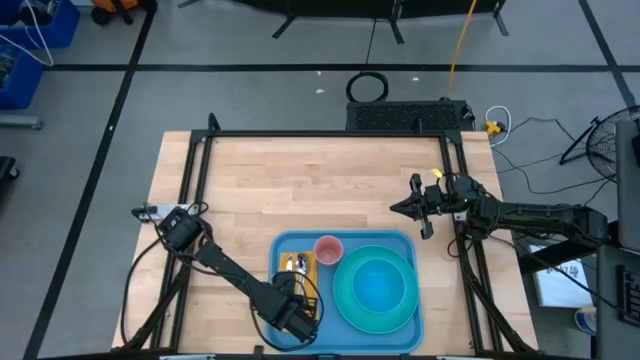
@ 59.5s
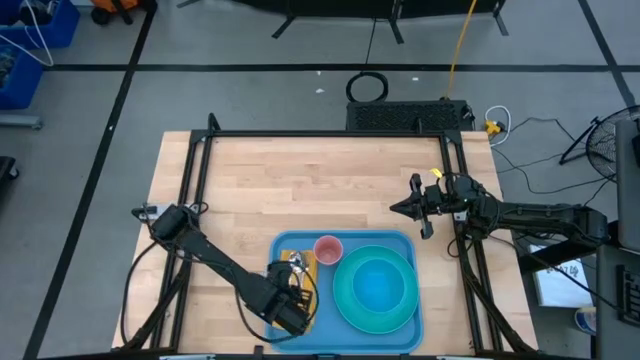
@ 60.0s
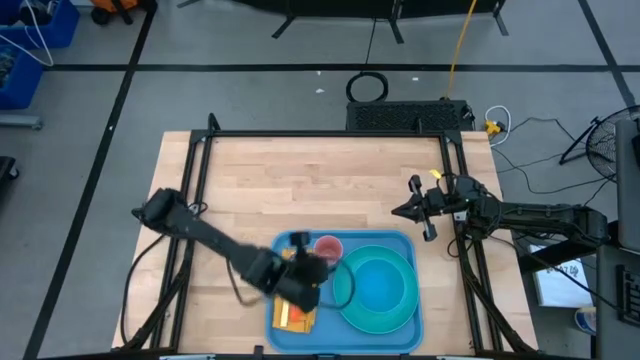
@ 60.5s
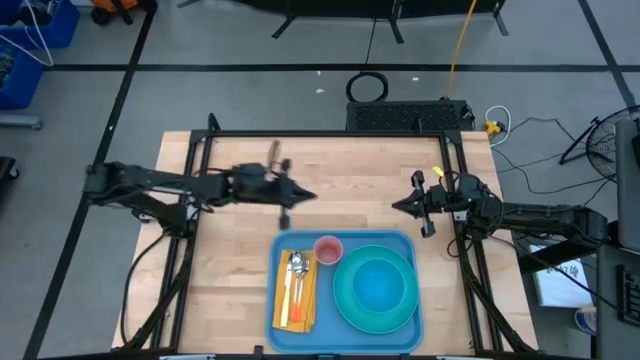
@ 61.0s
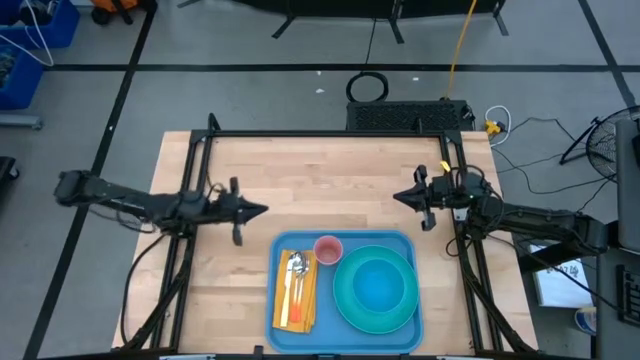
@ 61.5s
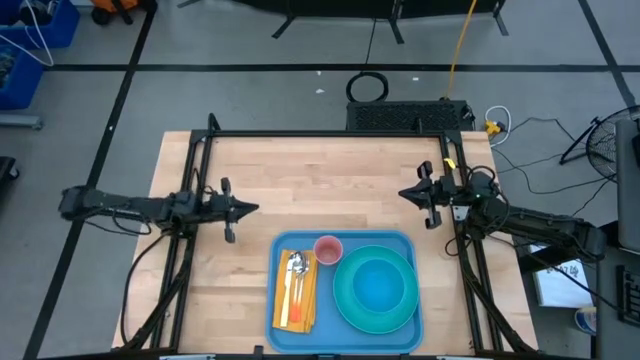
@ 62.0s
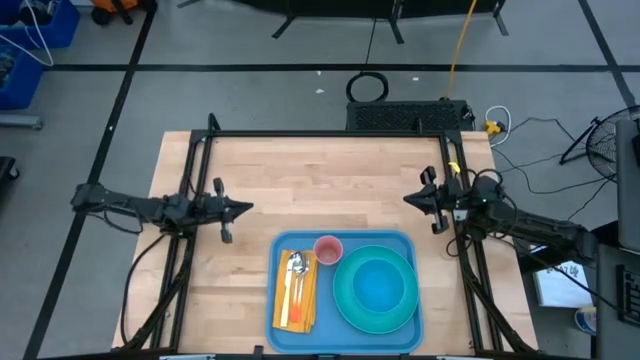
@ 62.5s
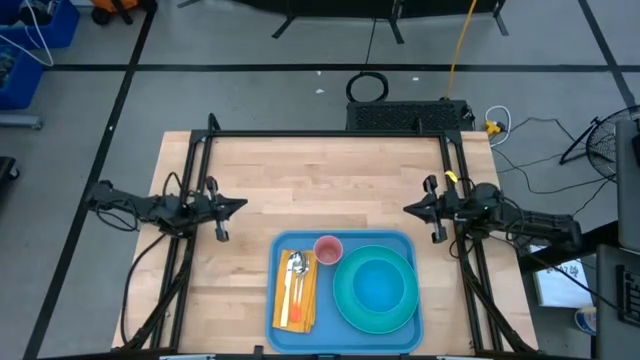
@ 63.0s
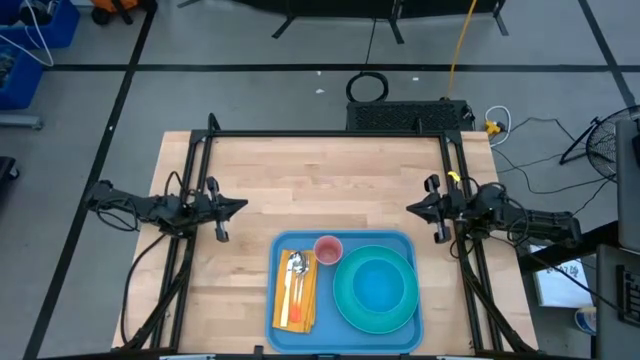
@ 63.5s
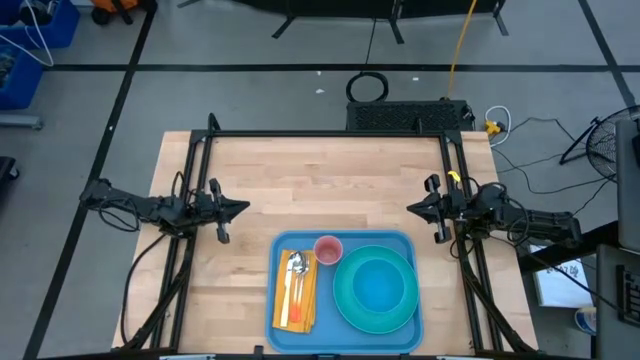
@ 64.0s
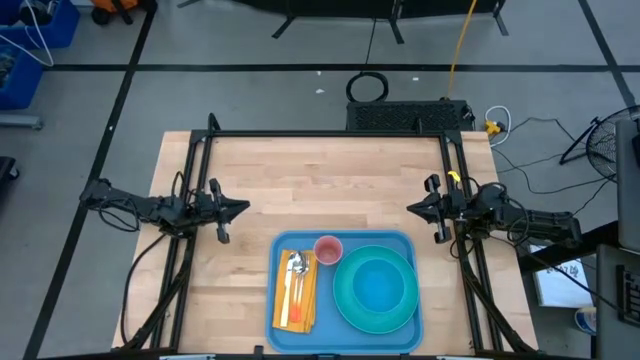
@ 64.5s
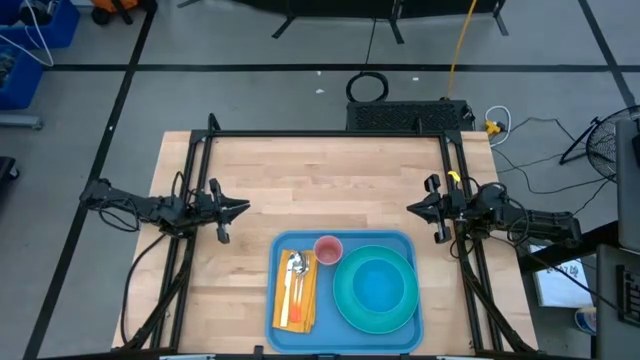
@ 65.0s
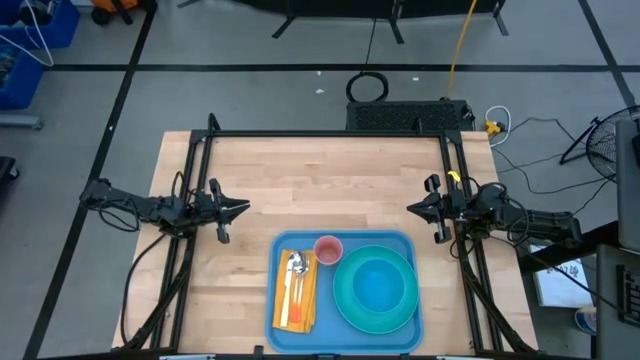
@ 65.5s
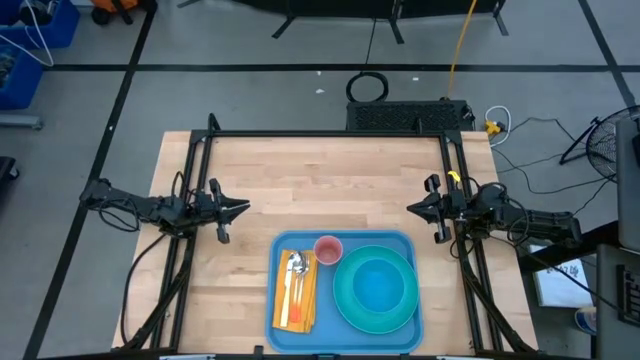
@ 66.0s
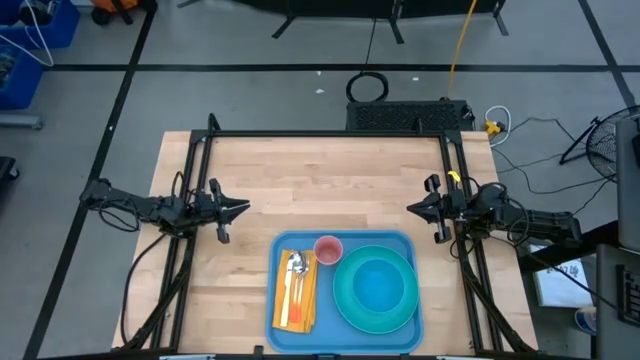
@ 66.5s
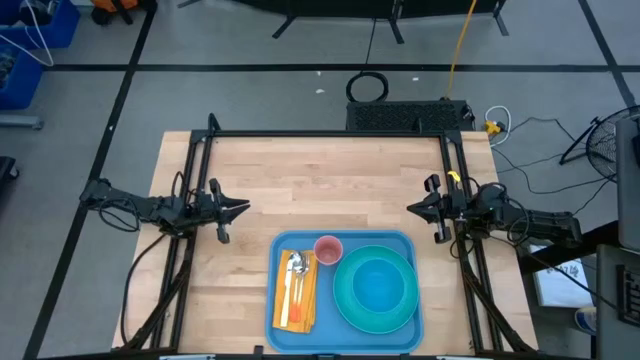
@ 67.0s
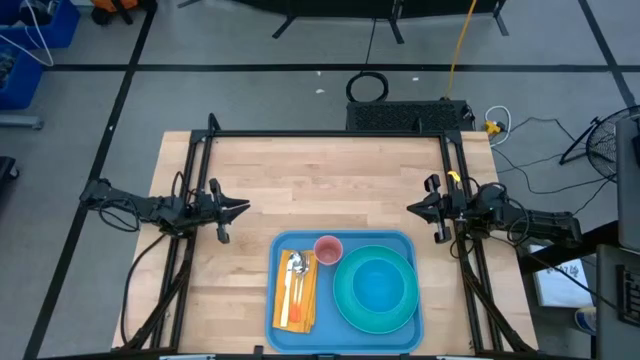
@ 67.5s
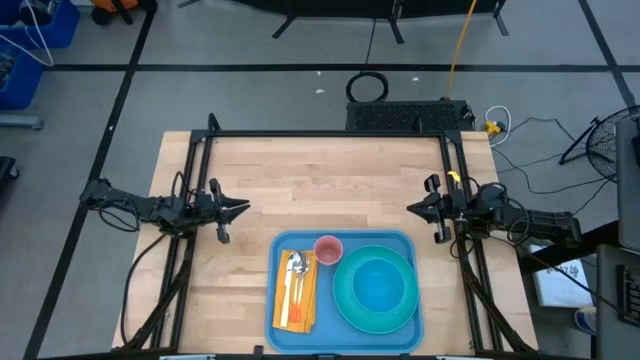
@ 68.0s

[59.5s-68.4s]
Task: Set up tray
Return to Home Position

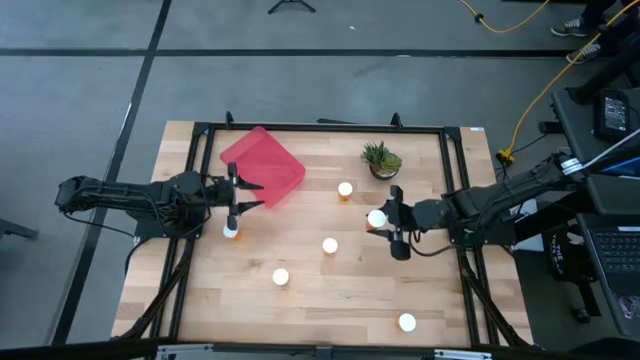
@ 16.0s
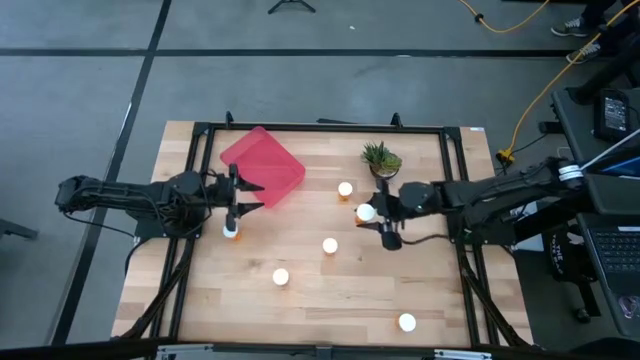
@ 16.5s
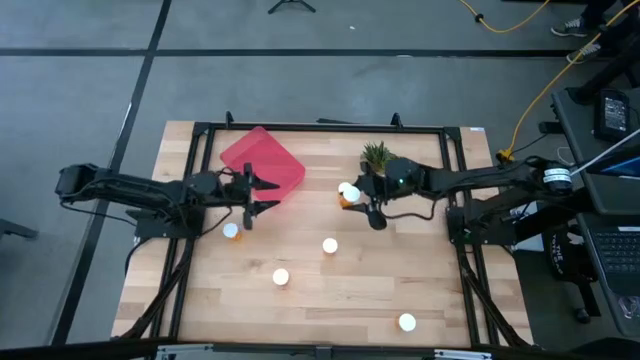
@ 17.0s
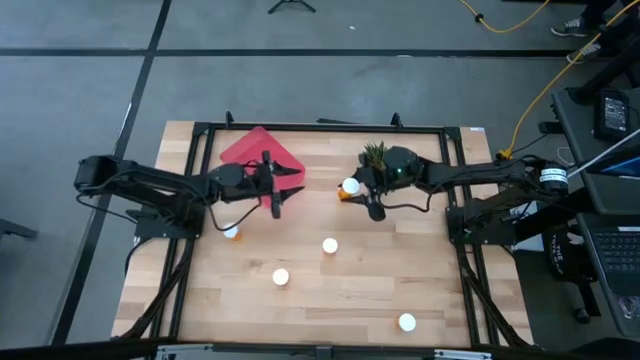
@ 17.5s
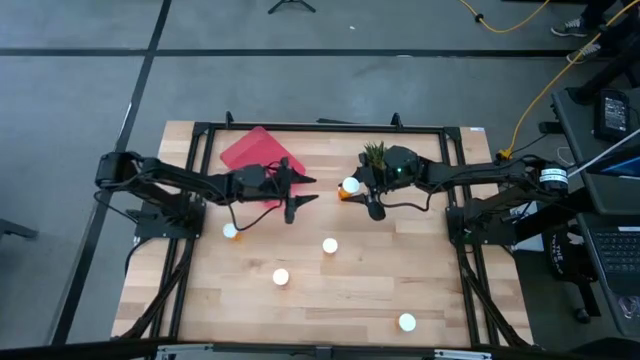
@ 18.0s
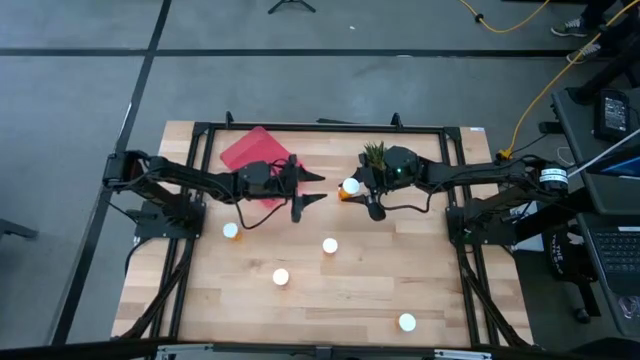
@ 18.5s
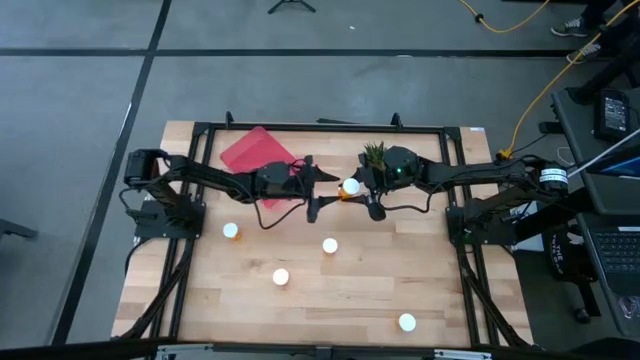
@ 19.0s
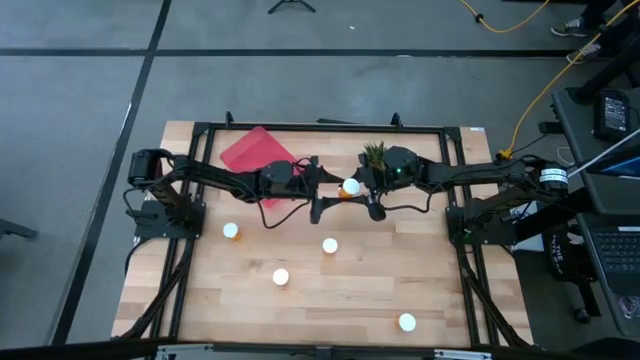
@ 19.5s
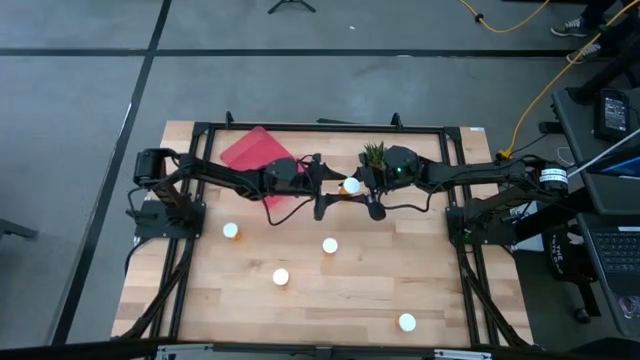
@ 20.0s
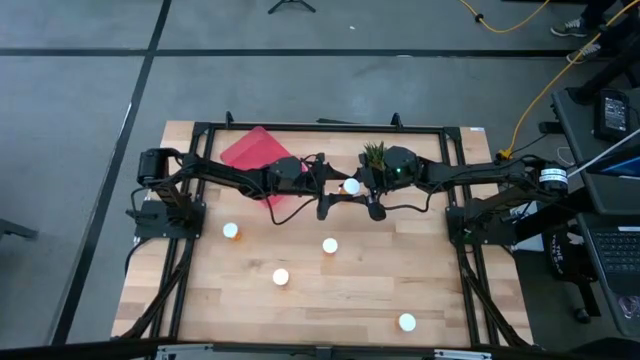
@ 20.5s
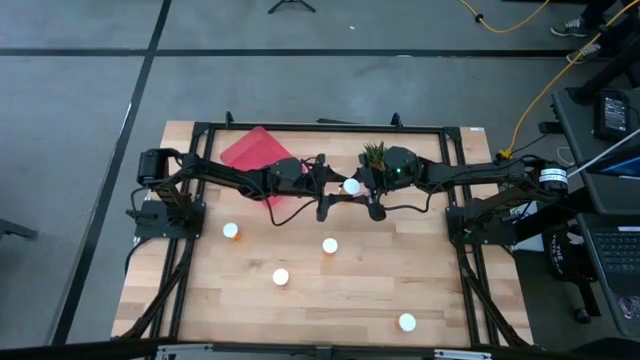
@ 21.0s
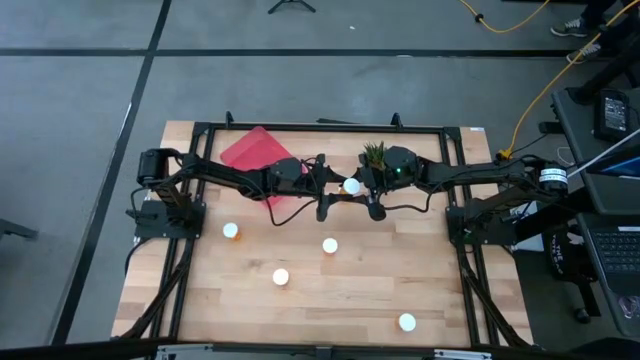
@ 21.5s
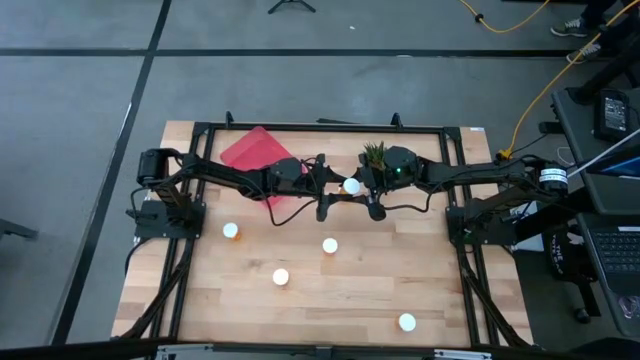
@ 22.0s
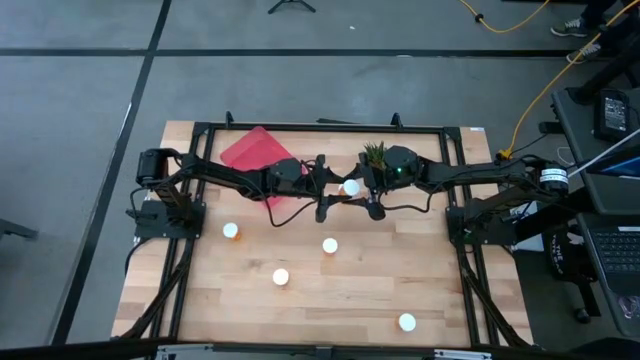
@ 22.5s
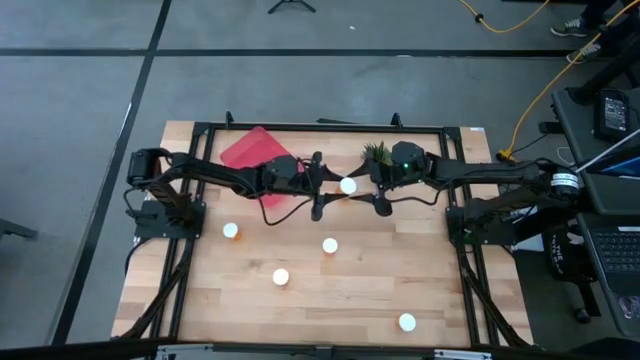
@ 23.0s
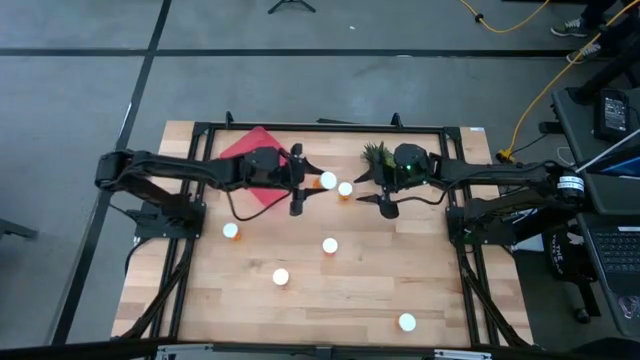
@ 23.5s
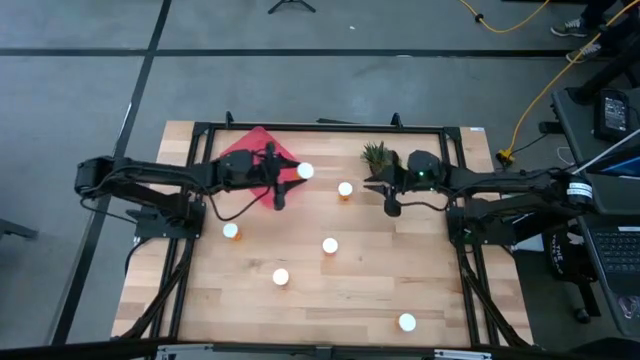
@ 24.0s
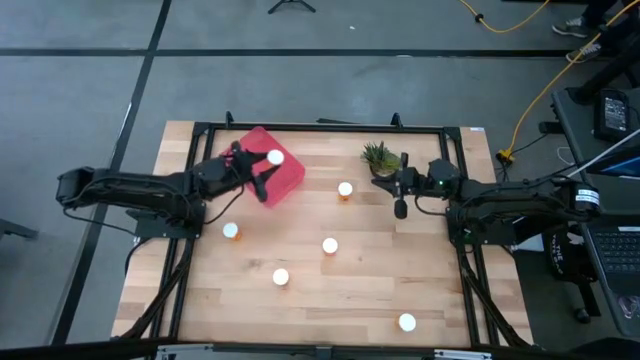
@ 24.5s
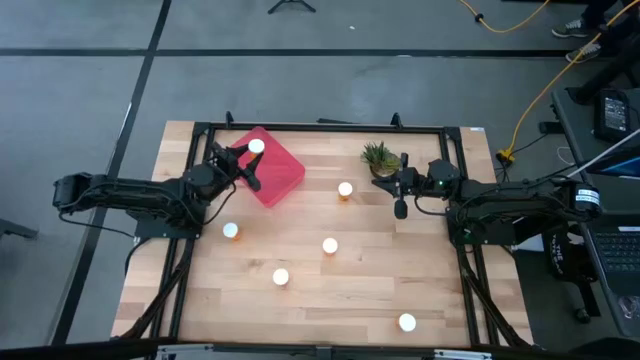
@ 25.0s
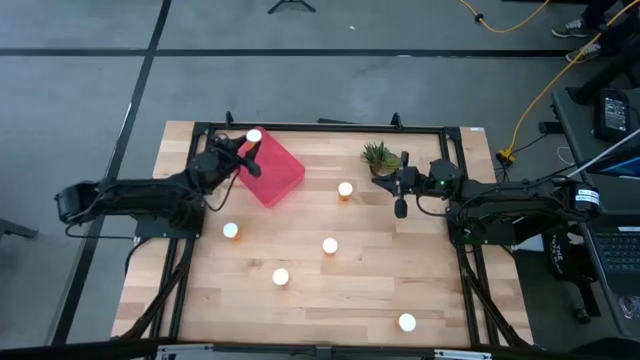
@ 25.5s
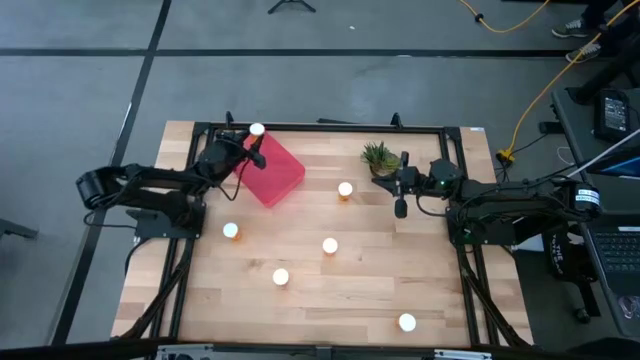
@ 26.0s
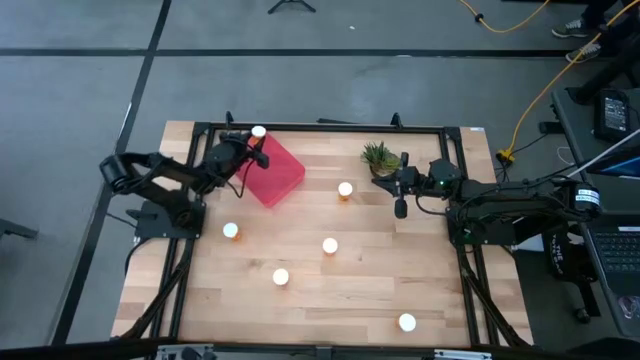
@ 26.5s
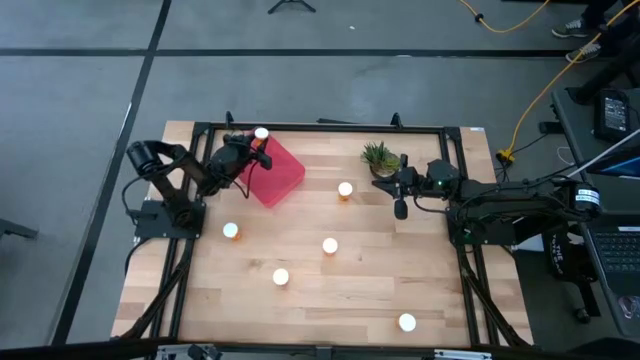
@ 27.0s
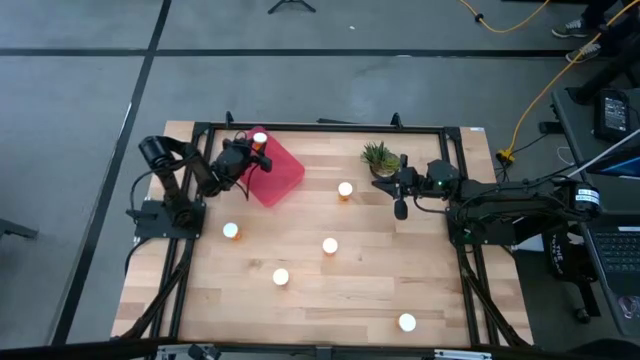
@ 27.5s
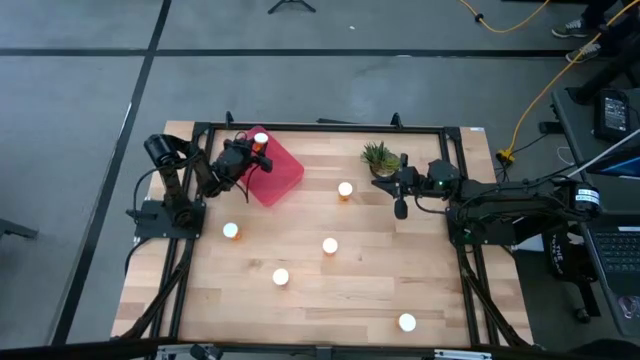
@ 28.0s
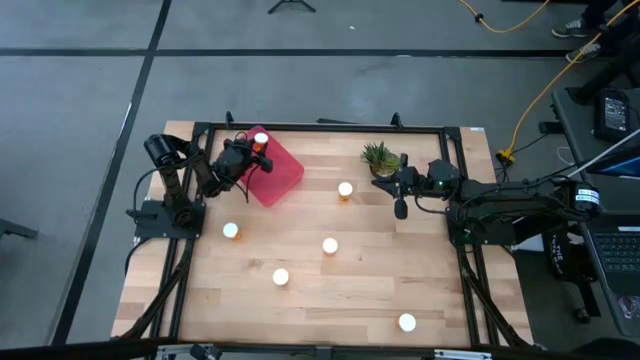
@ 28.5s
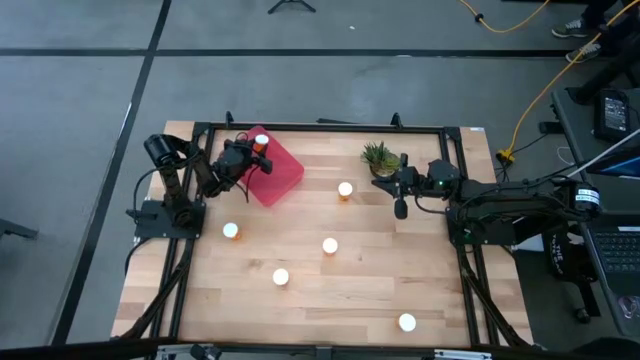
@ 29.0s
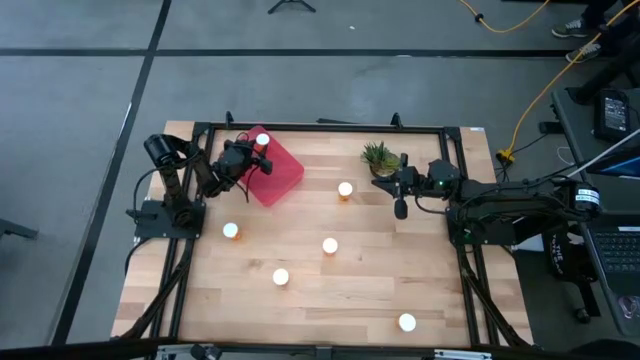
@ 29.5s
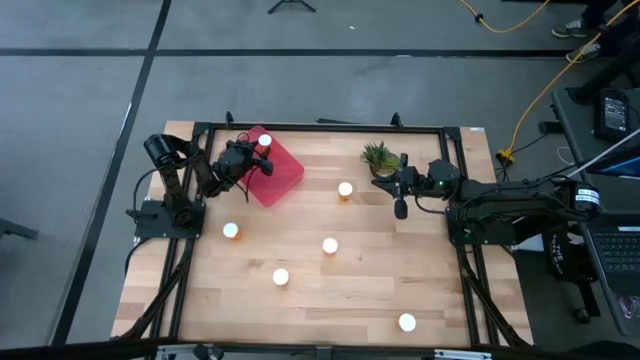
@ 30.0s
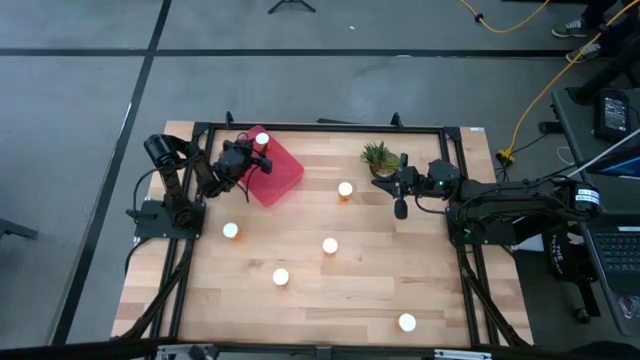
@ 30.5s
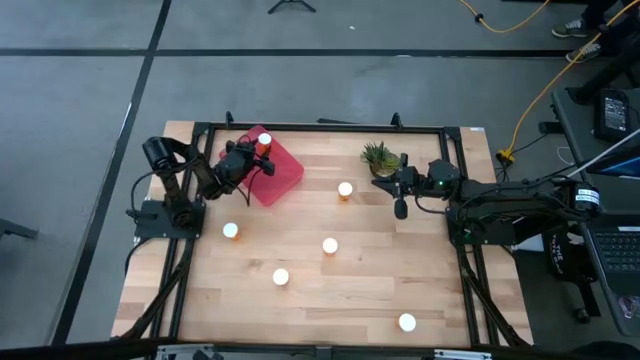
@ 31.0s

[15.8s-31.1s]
Task: Pick and place pill bottles into a basket
Put the orange pill bottle into the red container
